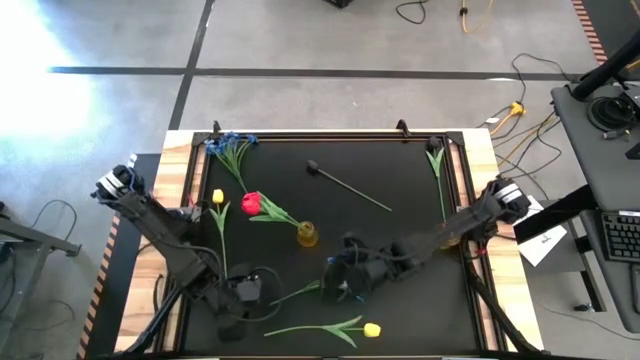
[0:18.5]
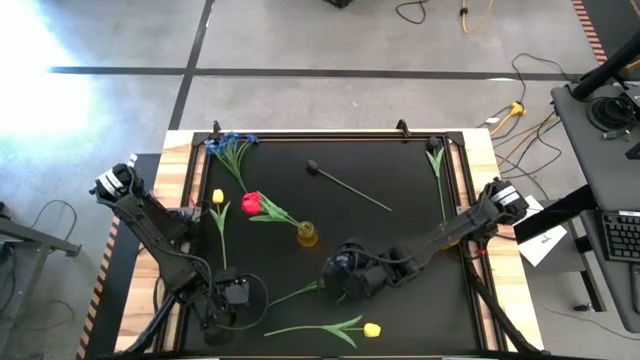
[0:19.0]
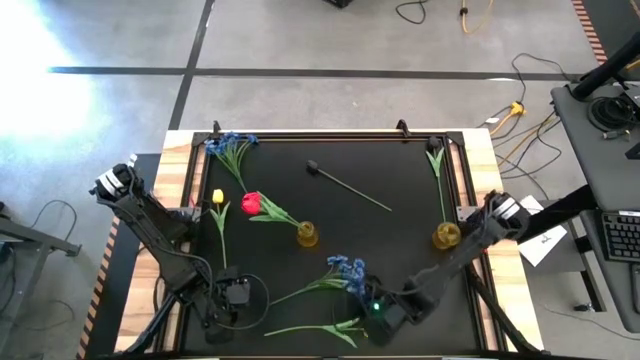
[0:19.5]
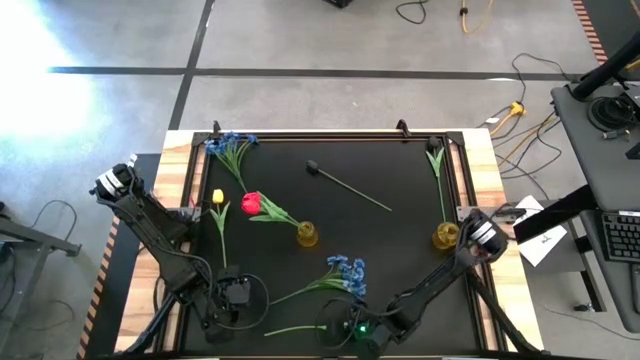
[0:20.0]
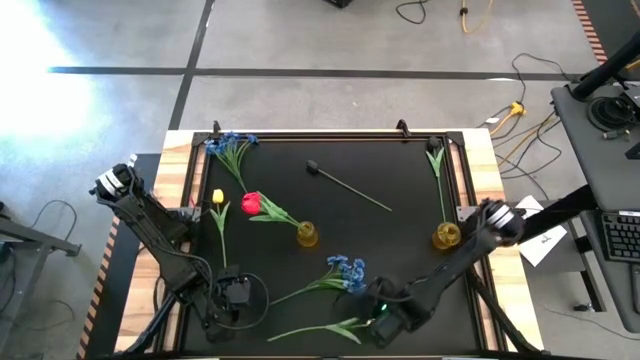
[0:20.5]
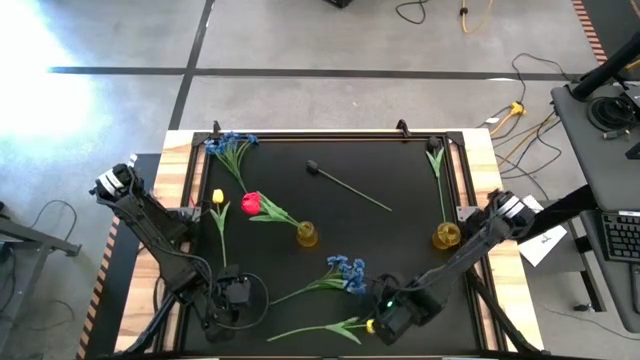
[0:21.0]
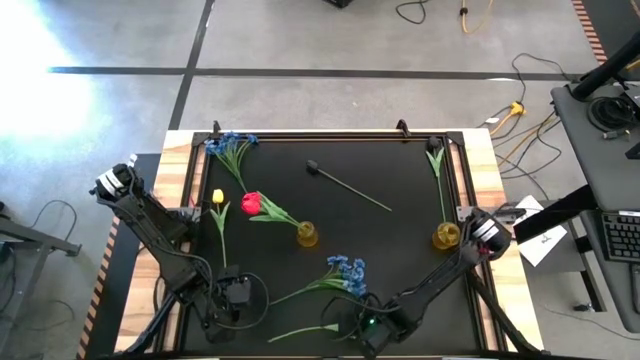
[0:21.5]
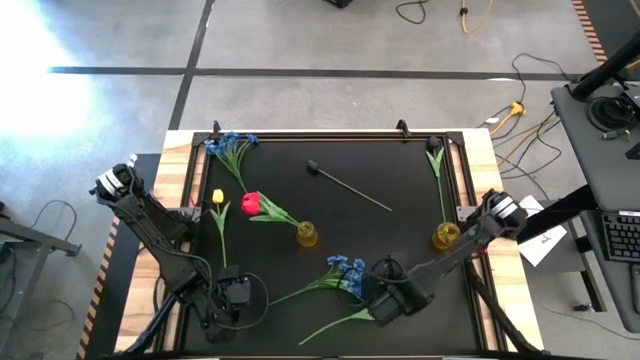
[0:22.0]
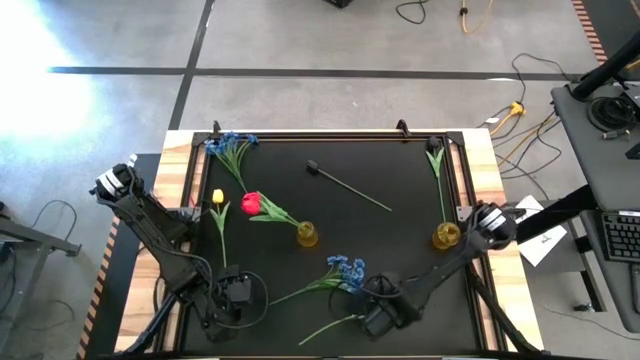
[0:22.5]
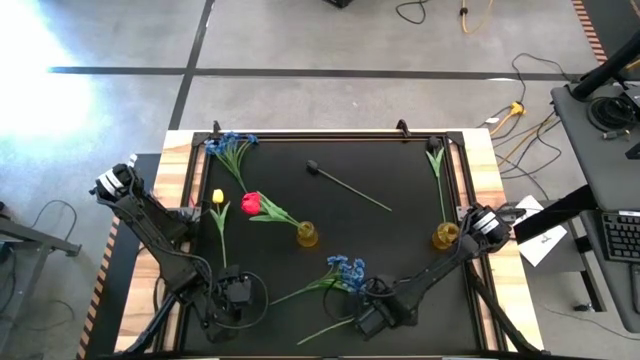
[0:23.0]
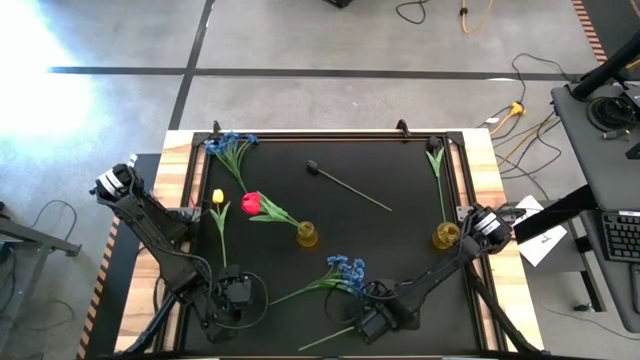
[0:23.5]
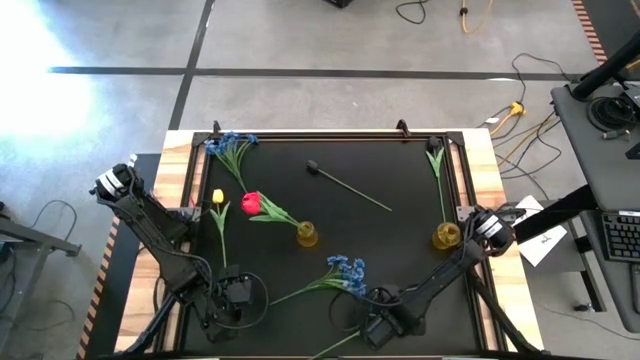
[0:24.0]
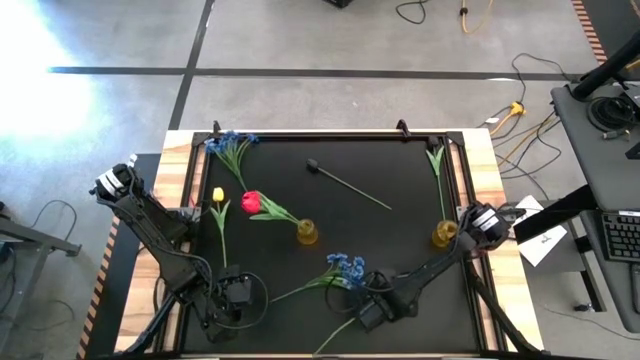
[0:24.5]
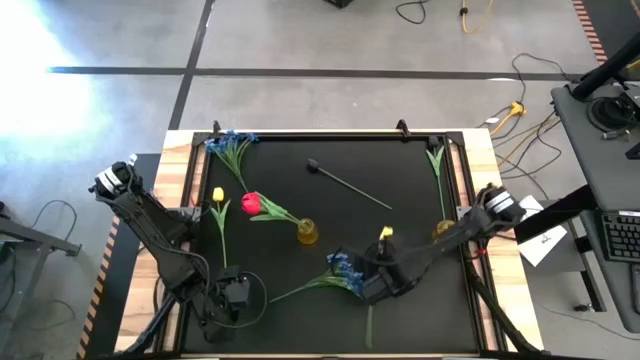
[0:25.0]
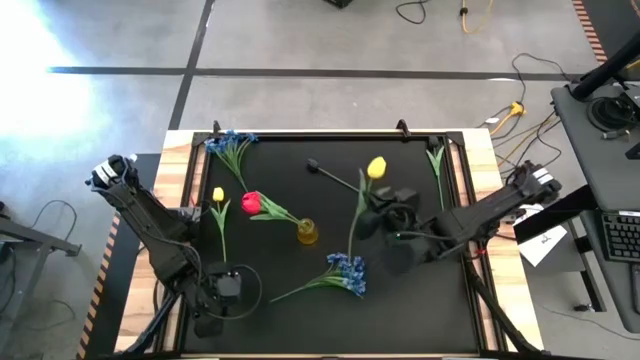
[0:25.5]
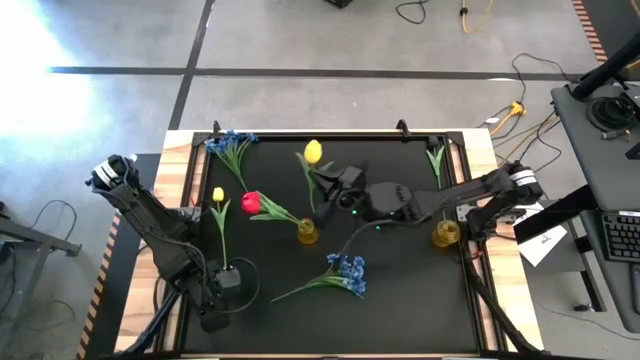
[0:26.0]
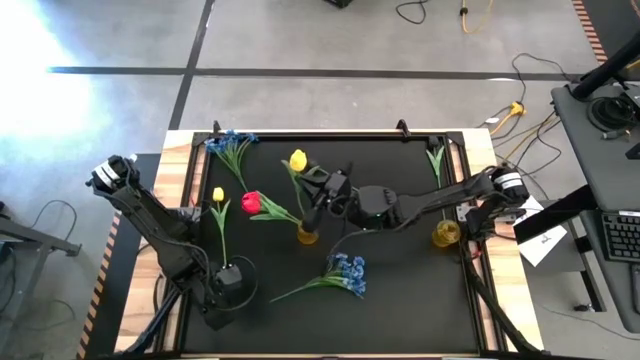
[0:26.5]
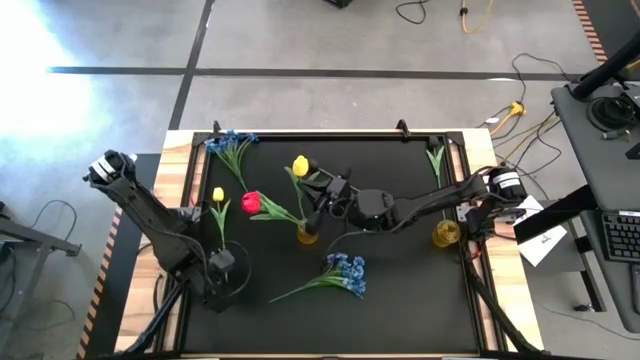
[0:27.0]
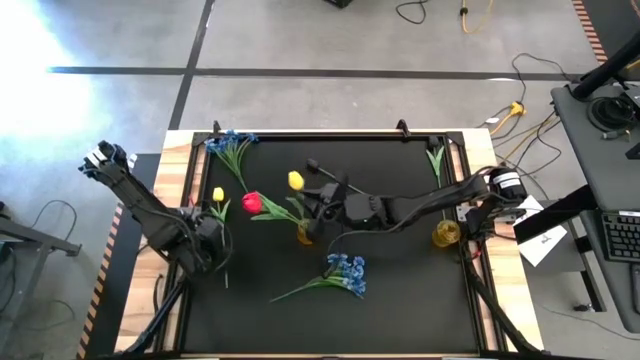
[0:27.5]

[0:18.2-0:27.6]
Task: Sort flowers into vase by color
Put the bottom yellow flower into the left yellow vase

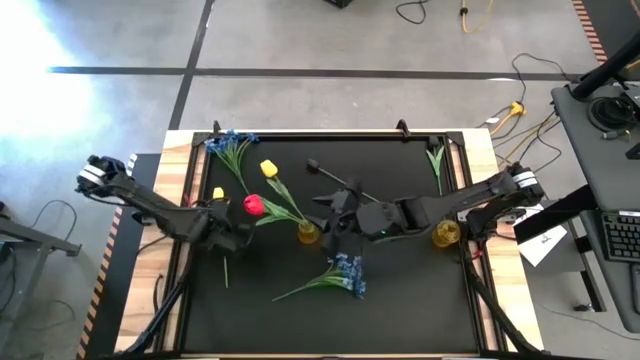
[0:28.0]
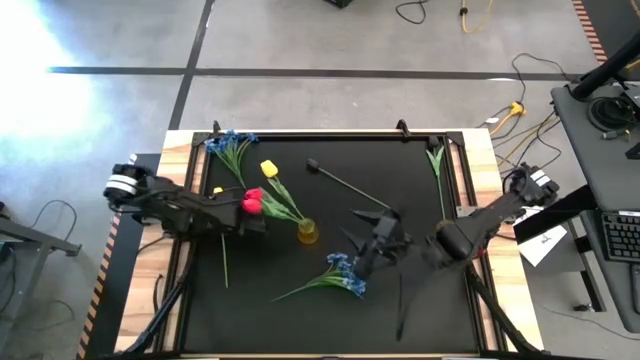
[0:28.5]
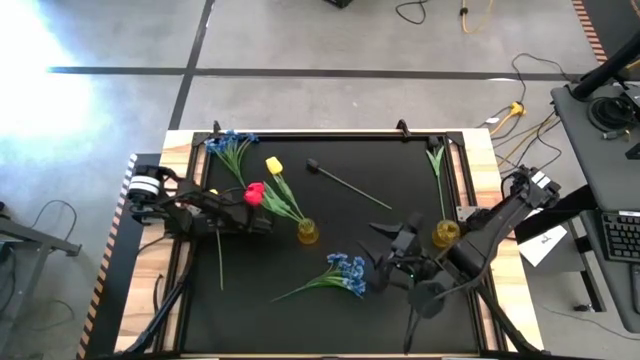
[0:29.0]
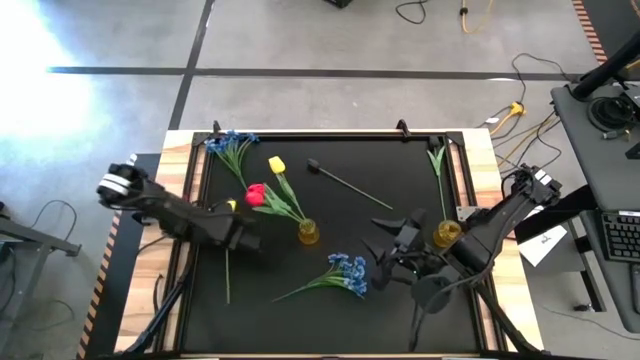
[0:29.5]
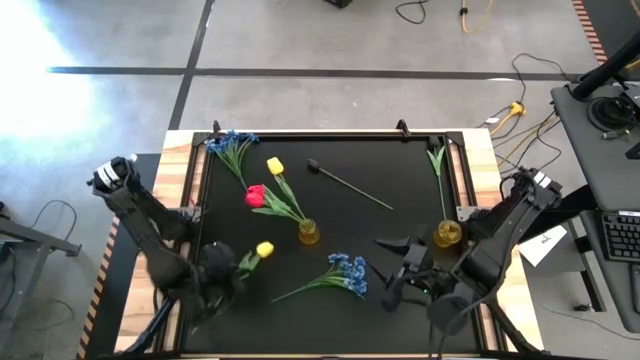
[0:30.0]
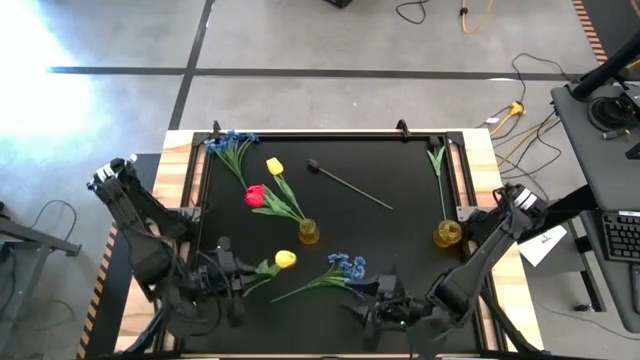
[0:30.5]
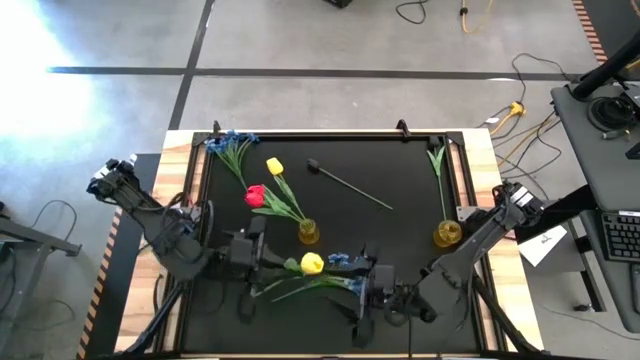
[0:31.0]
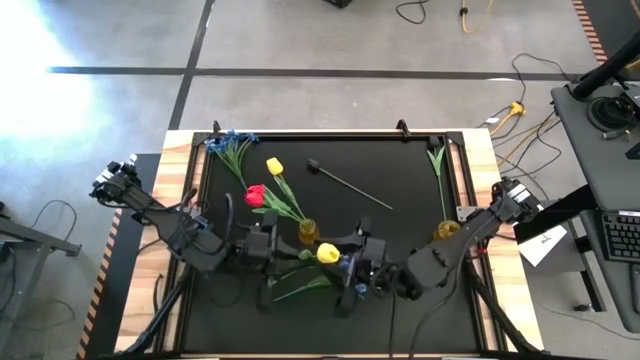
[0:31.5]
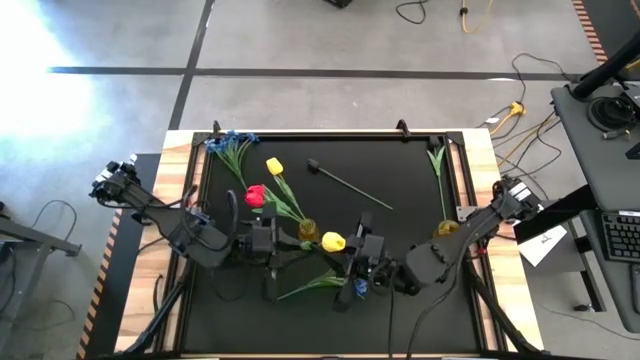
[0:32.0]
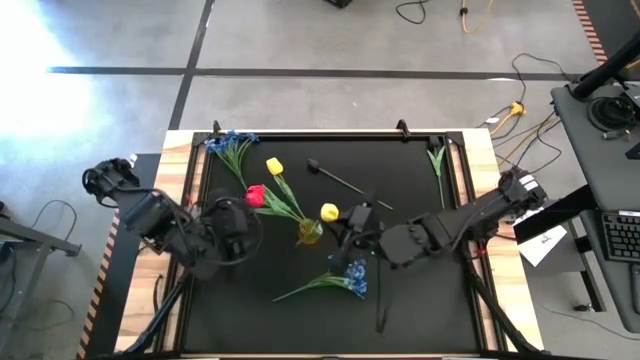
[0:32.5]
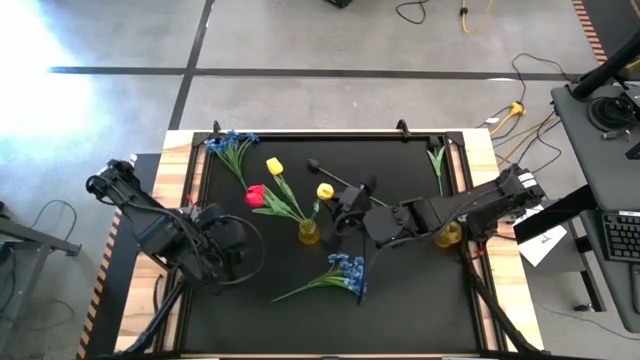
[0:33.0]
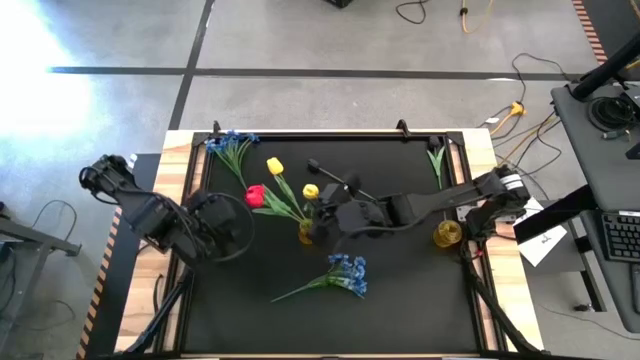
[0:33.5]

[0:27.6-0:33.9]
Put the yellow flower into the left yellow vase

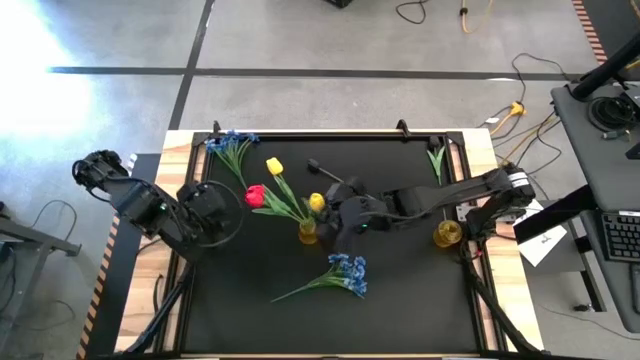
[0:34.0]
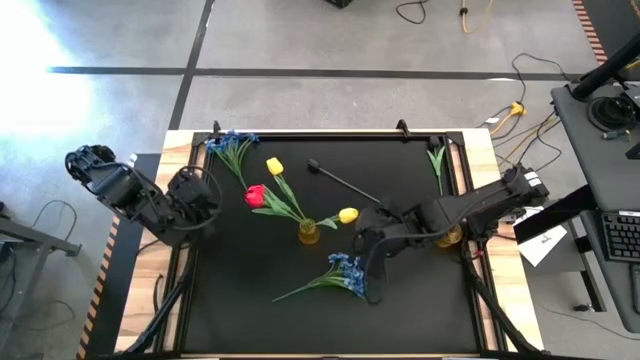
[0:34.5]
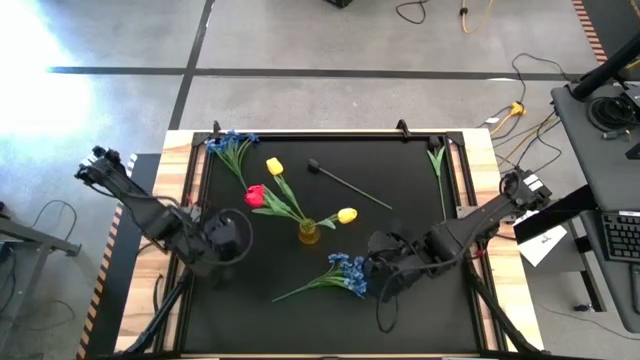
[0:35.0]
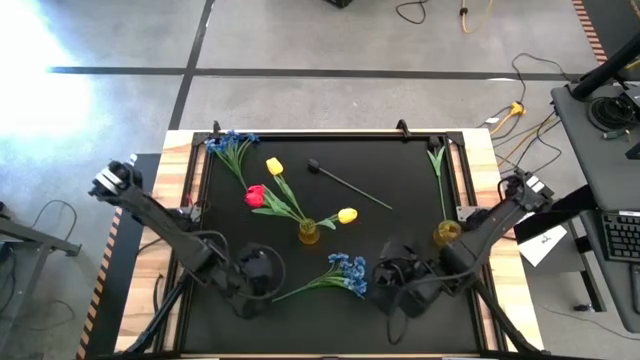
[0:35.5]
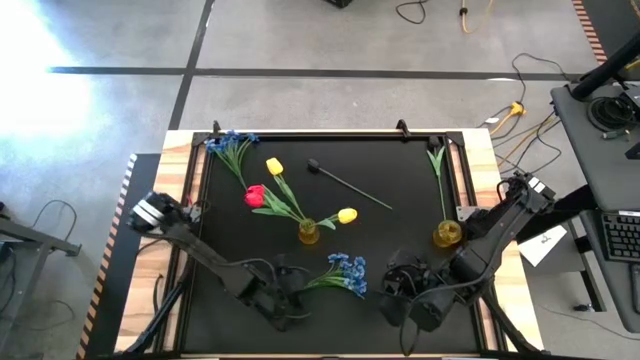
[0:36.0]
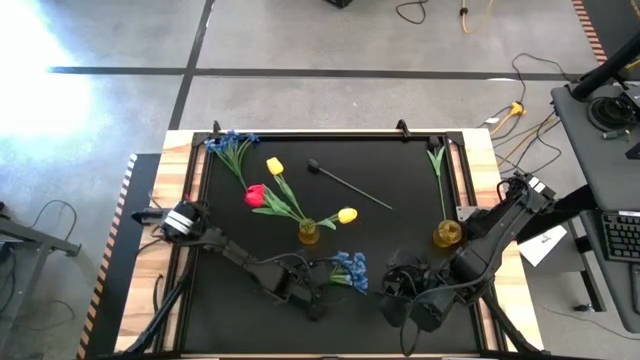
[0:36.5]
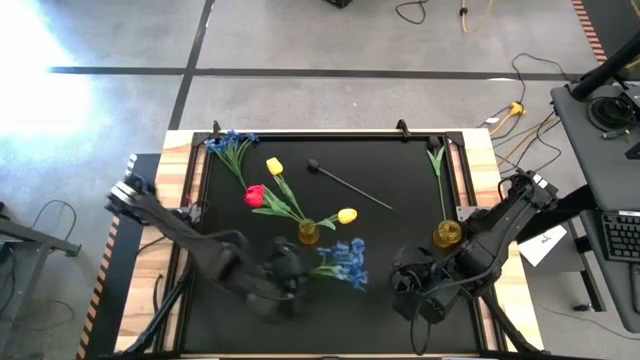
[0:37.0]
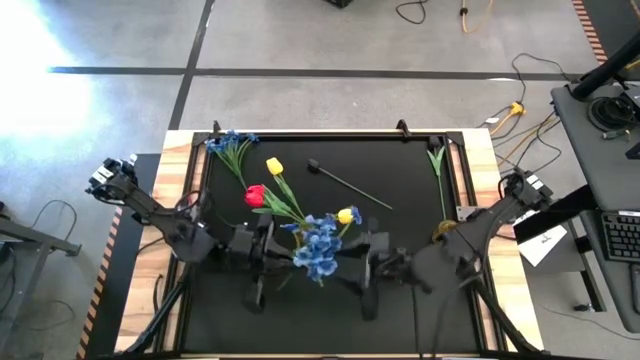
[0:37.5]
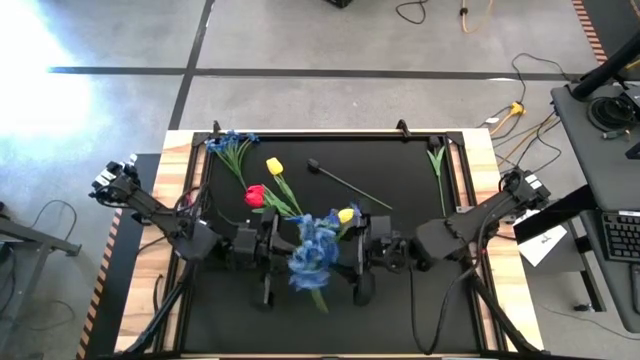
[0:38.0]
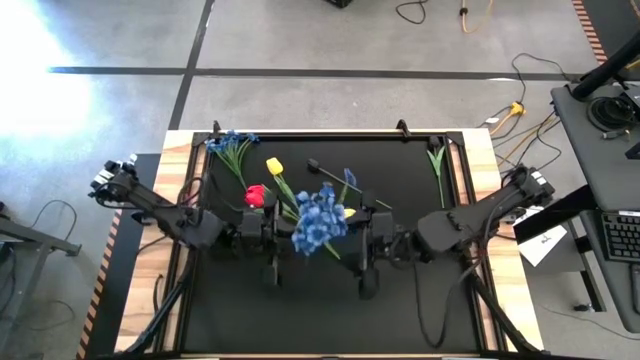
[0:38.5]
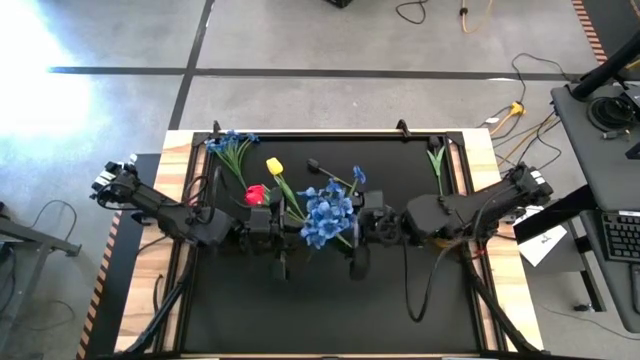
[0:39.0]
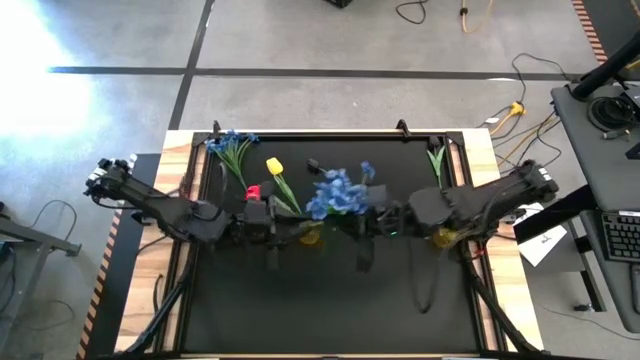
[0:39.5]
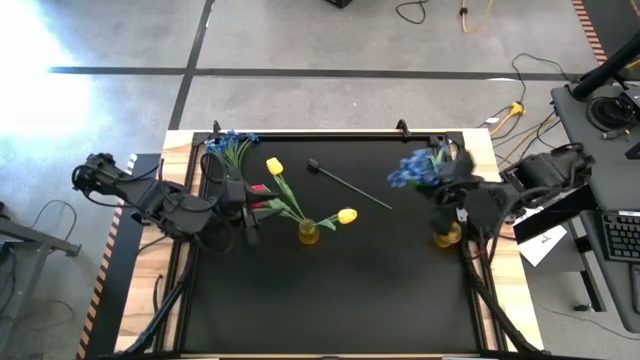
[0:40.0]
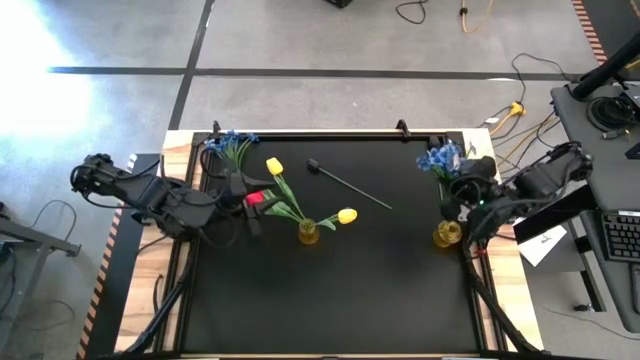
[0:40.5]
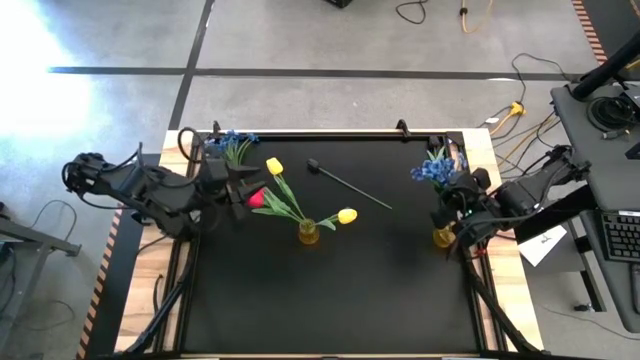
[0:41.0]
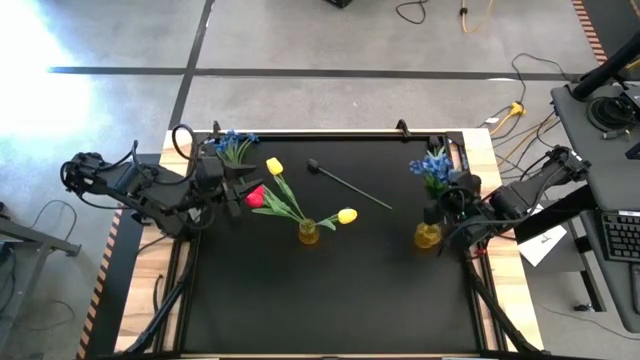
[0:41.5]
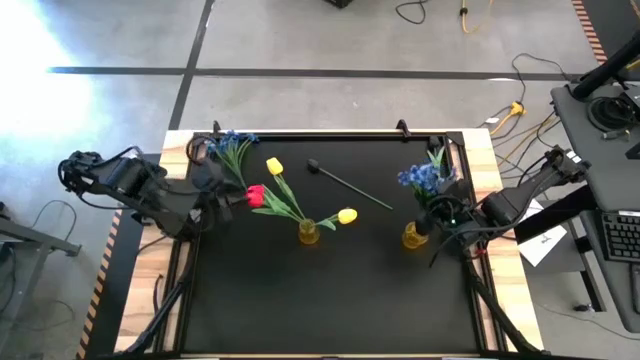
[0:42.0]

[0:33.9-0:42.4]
Put the bottom blue flowers into the right yellow vase
